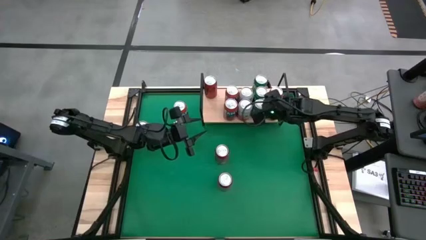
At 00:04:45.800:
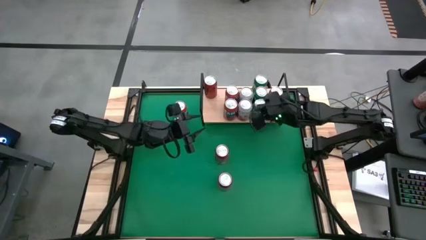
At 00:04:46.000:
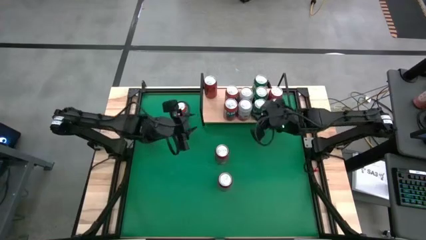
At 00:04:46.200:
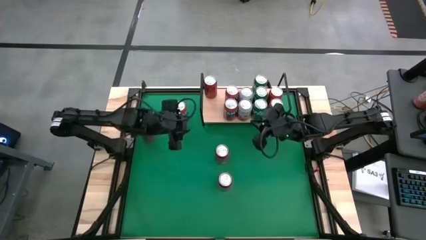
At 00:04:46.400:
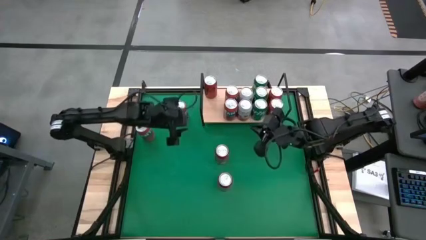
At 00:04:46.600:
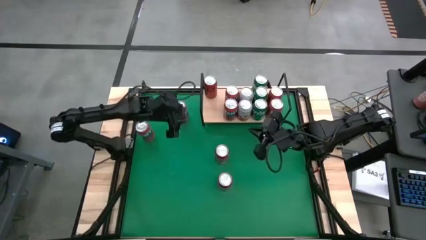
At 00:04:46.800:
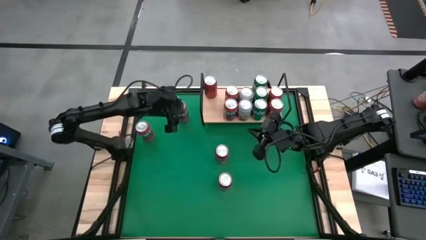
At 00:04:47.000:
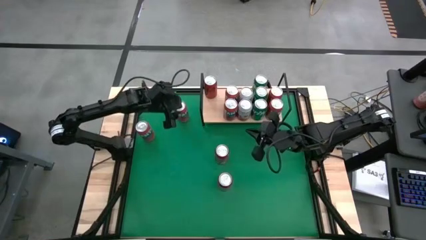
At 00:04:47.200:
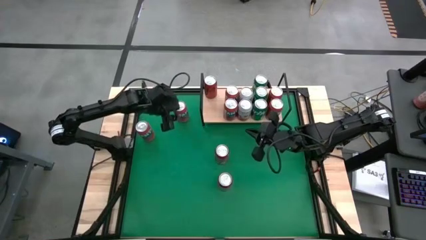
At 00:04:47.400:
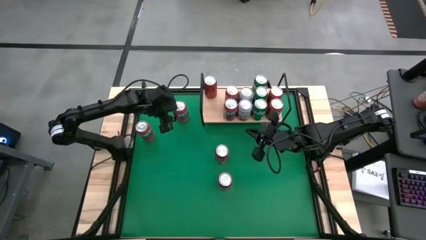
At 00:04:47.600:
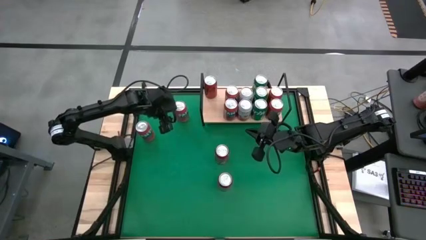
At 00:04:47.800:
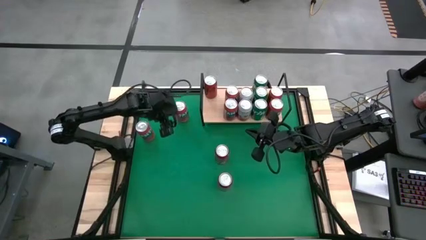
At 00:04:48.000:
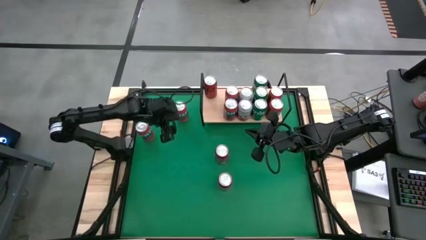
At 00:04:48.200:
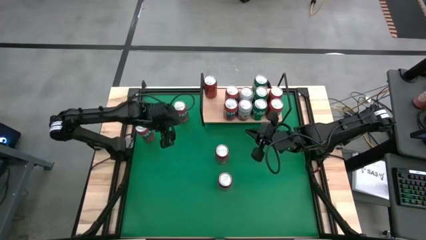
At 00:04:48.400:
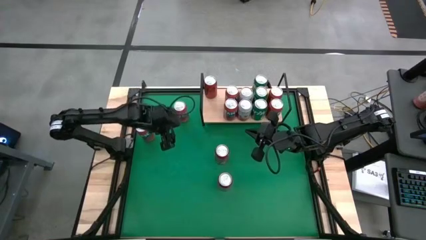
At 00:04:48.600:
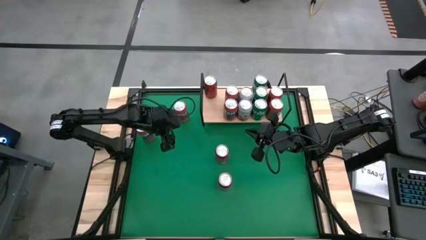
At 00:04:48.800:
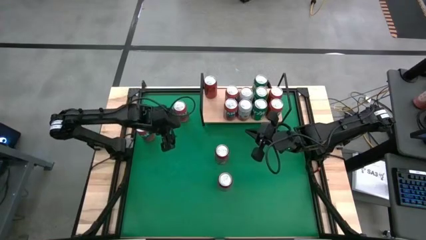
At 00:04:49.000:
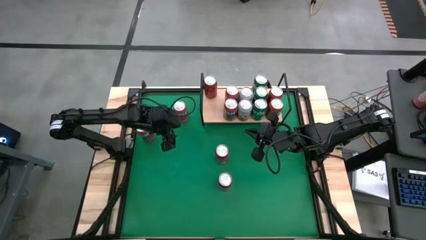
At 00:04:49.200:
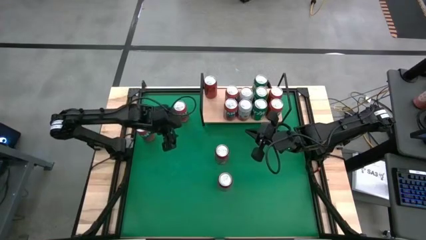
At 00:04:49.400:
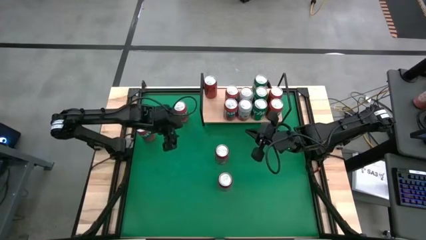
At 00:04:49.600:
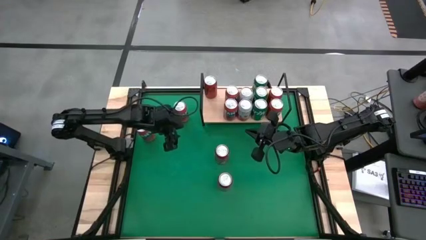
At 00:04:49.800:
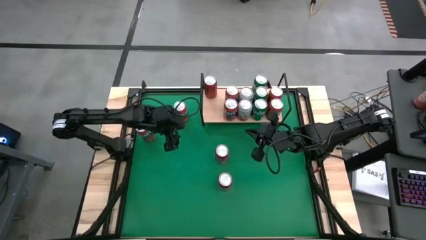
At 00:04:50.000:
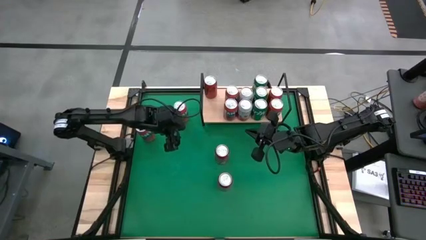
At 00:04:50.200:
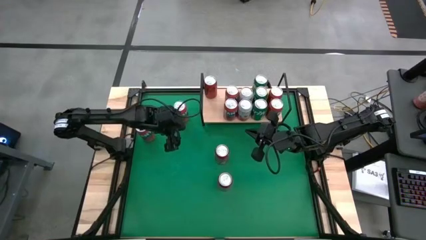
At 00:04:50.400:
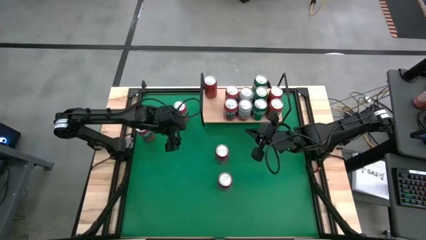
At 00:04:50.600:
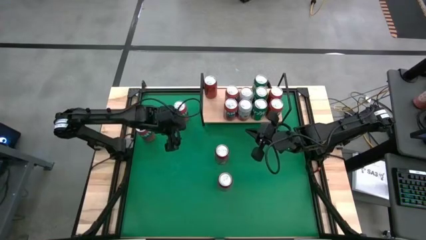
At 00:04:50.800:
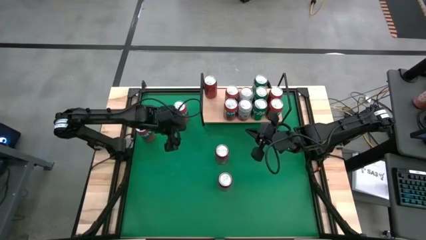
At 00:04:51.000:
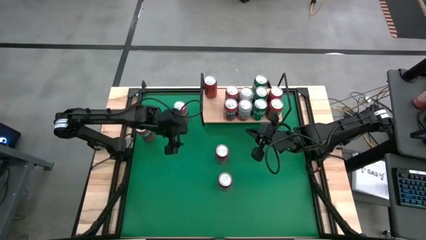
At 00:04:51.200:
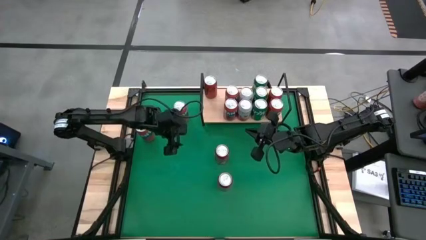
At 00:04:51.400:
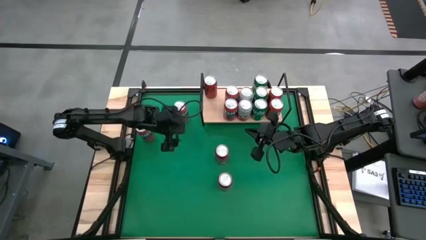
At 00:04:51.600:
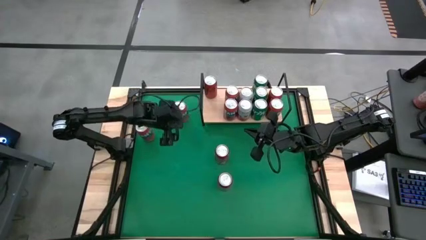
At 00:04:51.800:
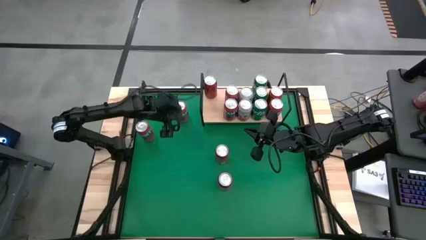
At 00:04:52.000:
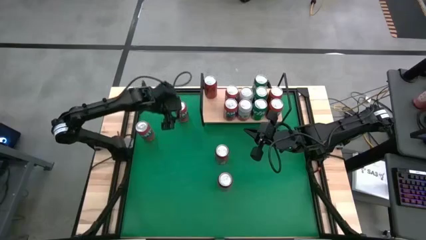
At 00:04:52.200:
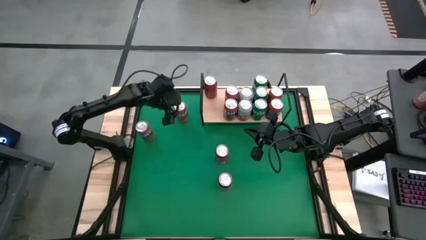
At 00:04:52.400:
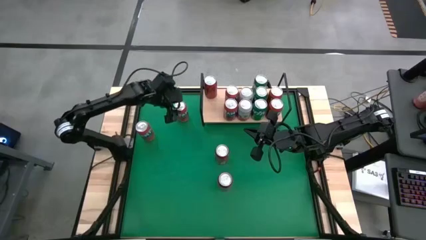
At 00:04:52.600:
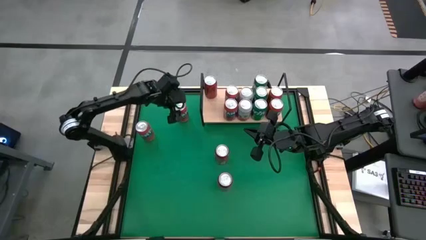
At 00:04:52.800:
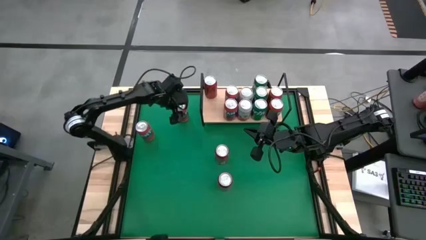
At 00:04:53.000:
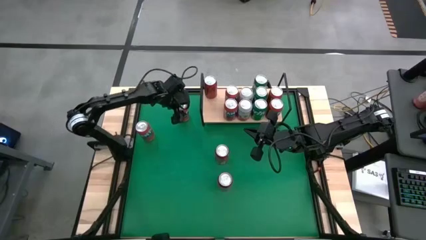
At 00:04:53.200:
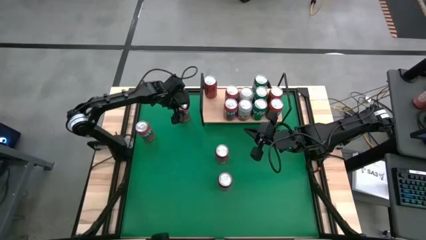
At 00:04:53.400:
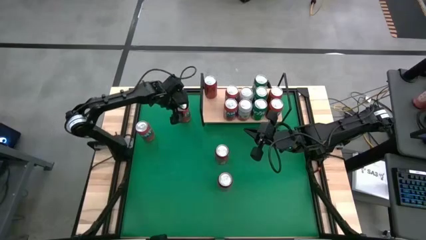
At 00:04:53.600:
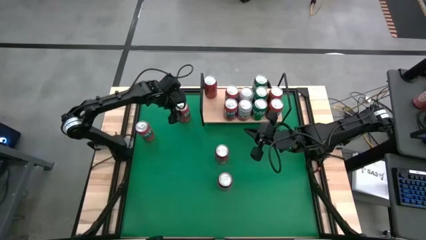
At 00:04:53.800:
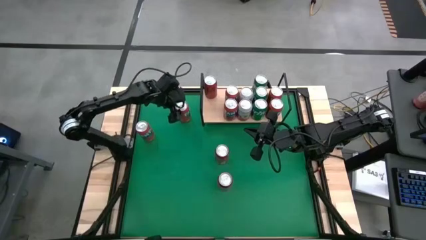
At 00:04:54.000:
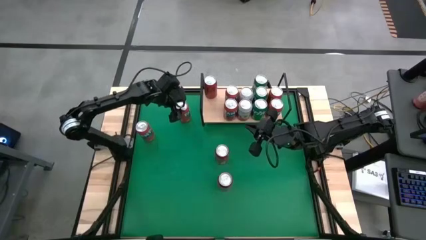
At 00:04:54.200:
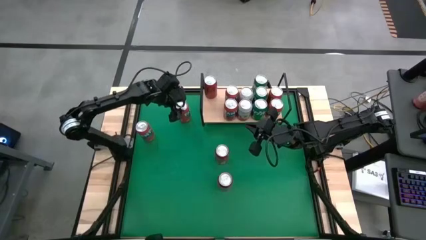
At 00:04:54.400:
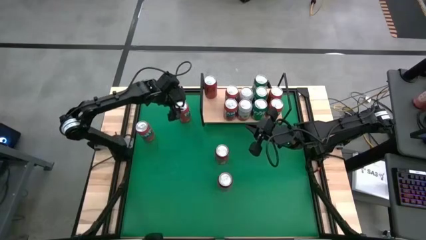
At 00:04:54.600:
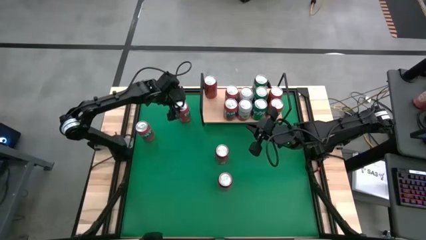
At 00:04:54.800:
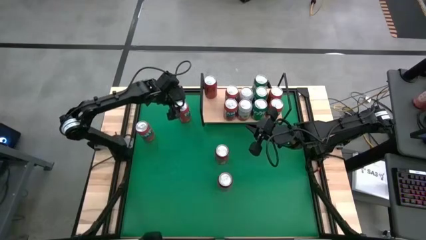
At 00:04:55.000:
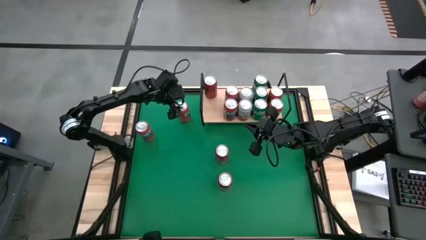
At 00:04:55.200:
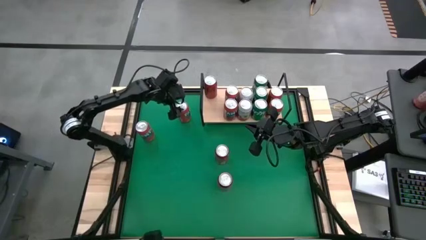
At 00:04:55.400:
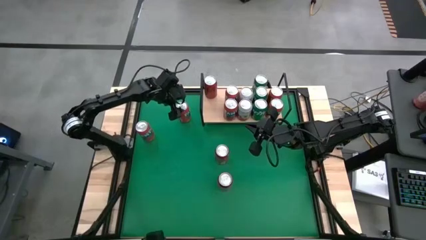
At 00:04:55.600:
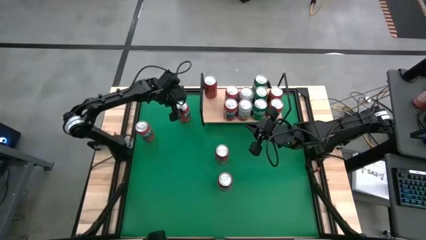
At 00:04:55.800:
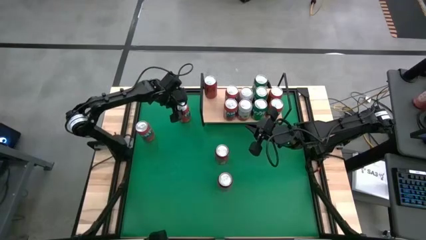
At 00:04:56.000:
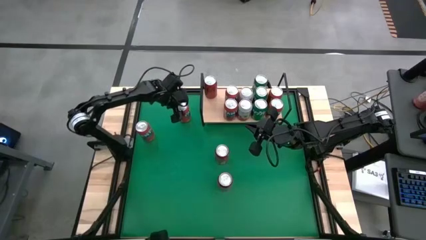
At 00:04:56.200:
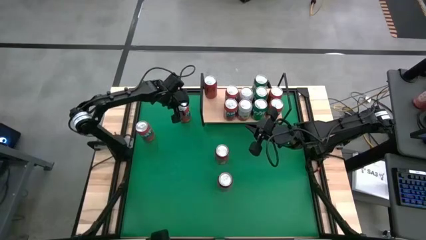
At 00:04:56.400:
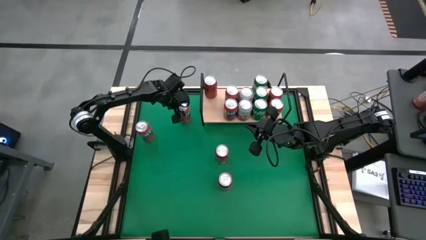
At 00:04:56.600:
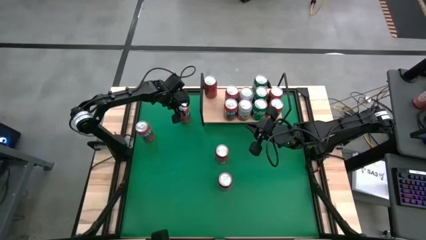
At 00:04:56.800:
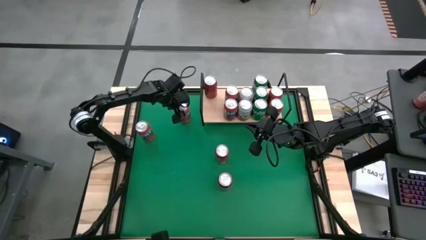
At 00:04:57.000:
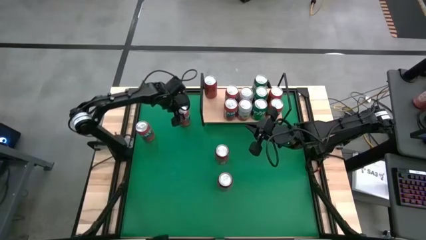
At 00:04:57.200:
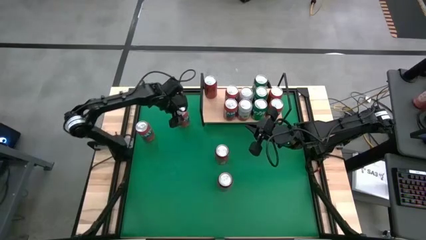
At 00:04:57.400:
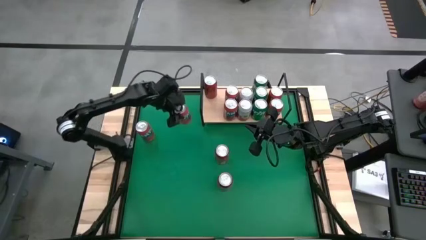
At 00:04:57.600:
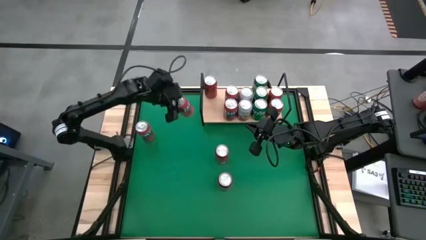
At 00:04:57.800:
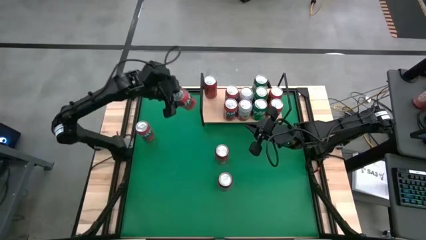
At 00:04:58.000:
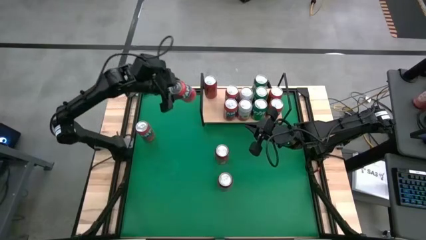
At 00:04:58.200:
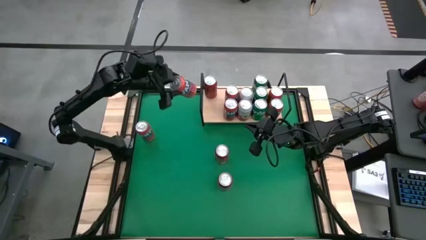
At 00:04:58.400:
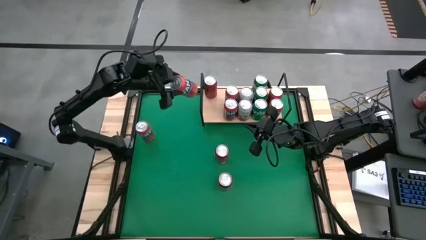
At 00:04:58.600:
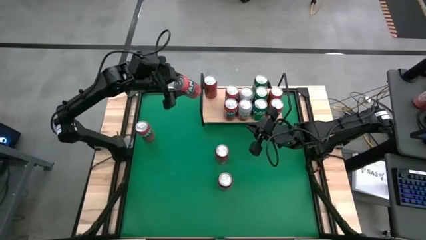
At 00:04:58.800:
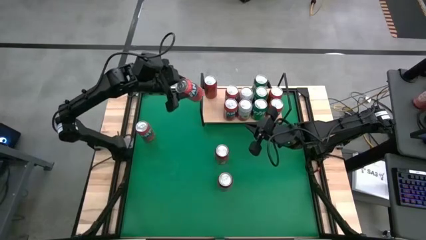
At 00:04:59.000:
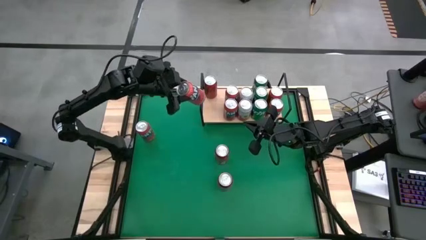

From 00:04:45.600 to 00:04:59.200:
Task: Place canned beverage on shelf
Put the red soda can on the shelf aligned with the other red soda can
